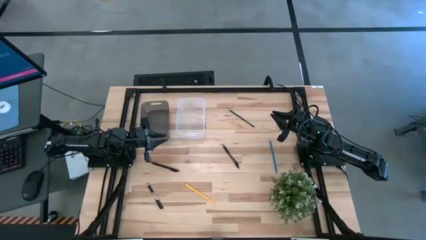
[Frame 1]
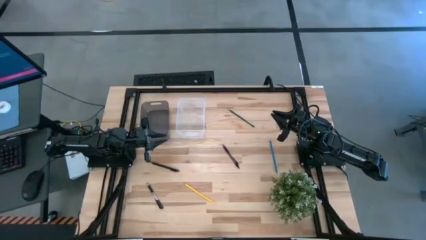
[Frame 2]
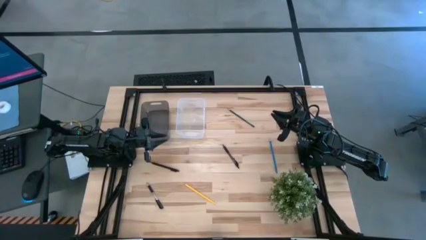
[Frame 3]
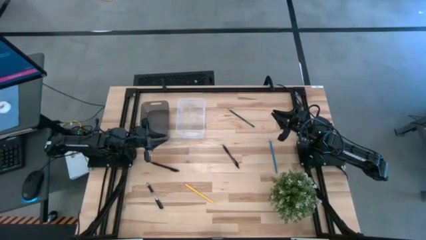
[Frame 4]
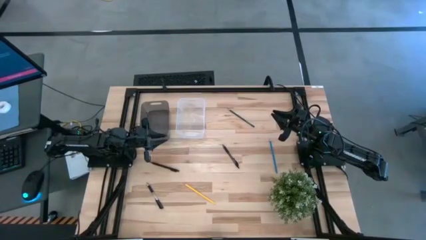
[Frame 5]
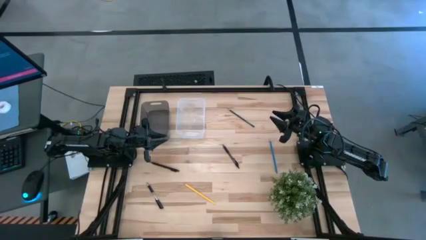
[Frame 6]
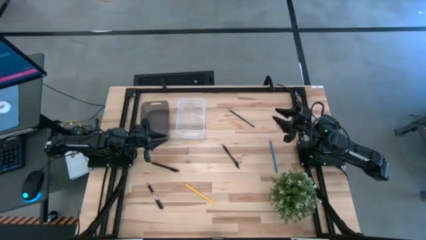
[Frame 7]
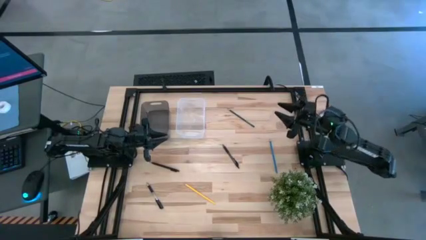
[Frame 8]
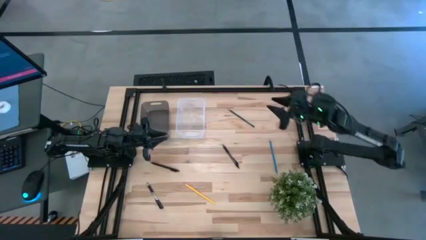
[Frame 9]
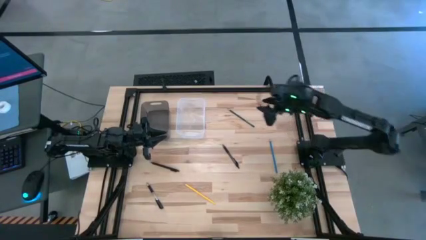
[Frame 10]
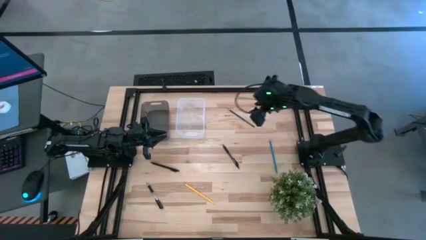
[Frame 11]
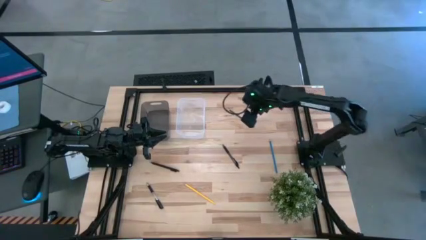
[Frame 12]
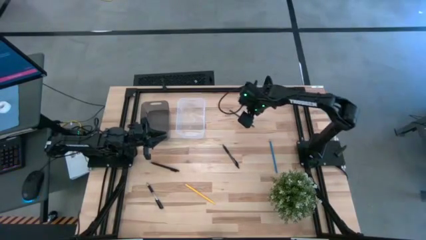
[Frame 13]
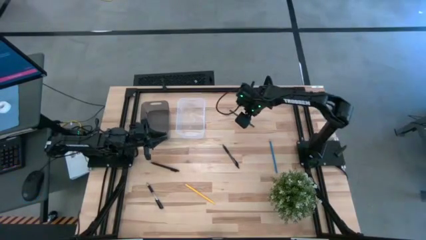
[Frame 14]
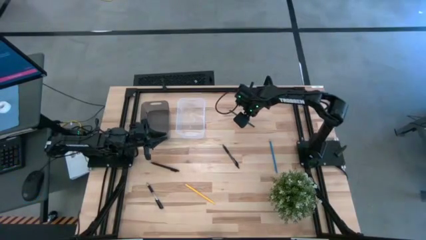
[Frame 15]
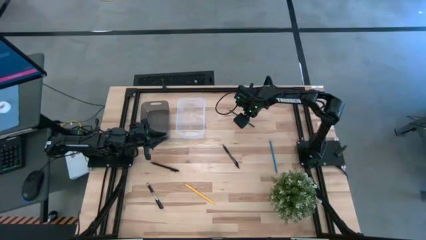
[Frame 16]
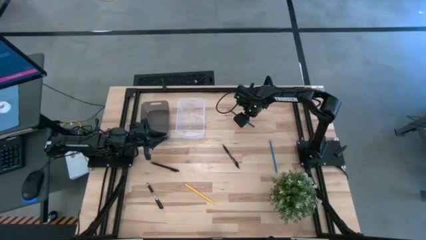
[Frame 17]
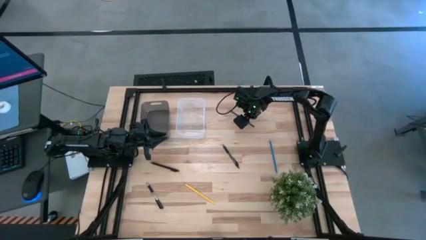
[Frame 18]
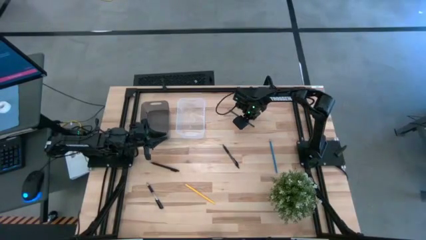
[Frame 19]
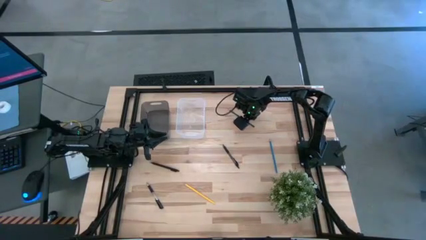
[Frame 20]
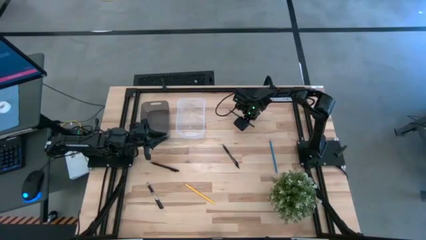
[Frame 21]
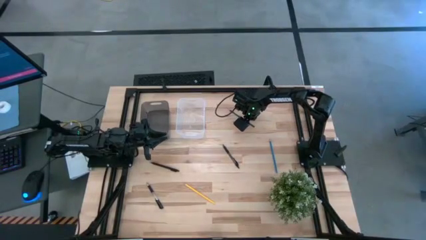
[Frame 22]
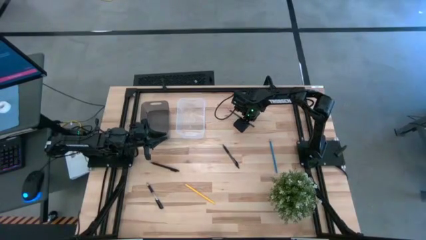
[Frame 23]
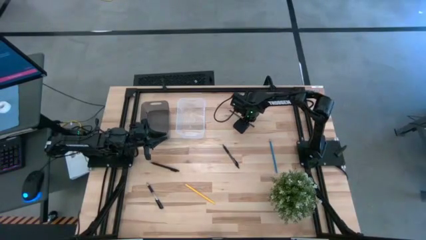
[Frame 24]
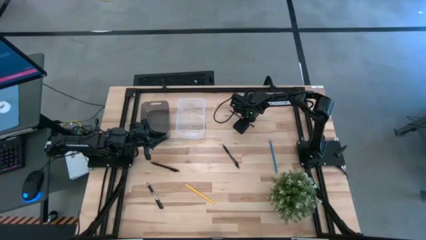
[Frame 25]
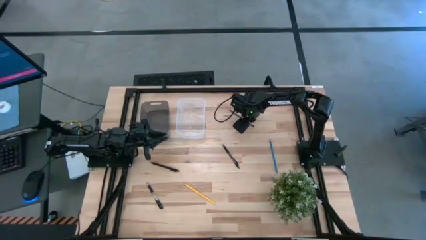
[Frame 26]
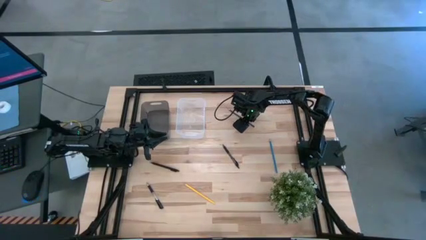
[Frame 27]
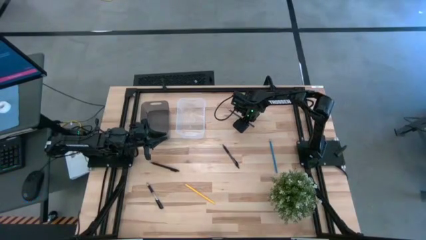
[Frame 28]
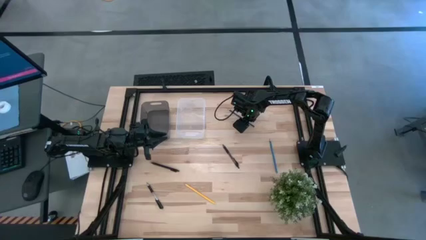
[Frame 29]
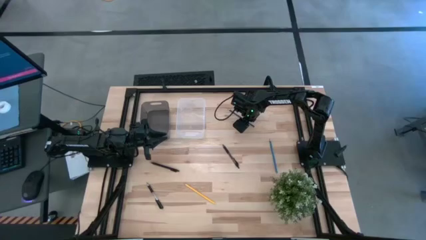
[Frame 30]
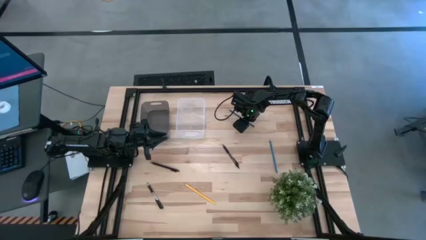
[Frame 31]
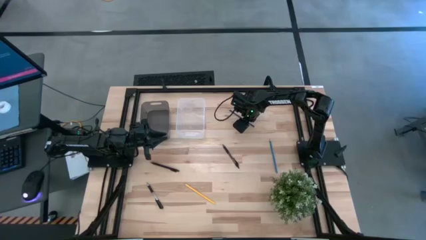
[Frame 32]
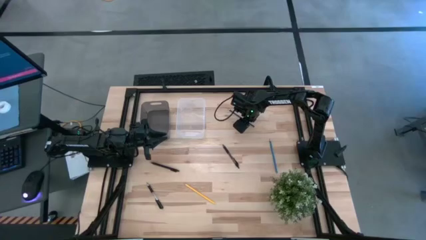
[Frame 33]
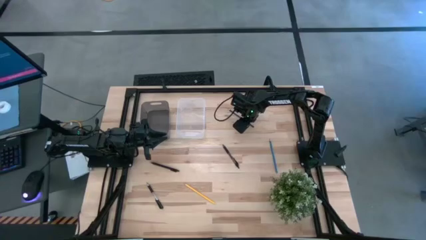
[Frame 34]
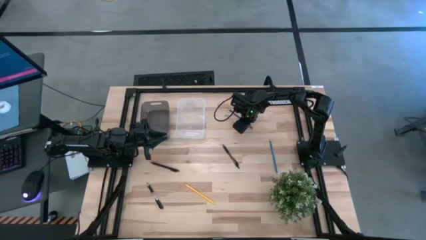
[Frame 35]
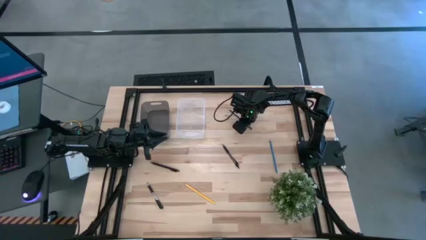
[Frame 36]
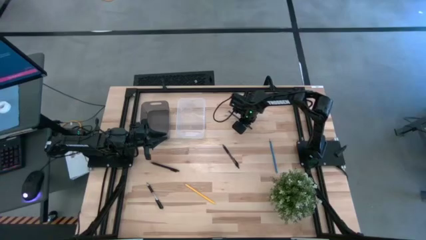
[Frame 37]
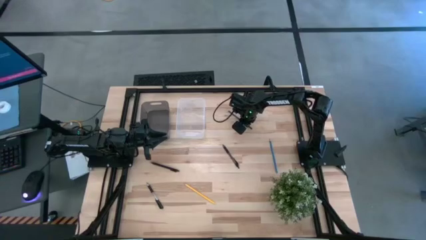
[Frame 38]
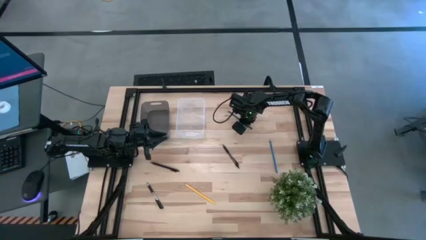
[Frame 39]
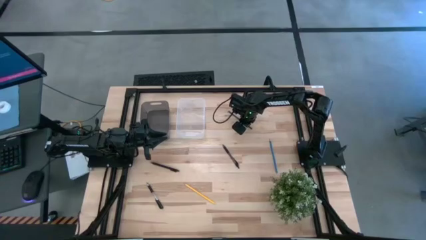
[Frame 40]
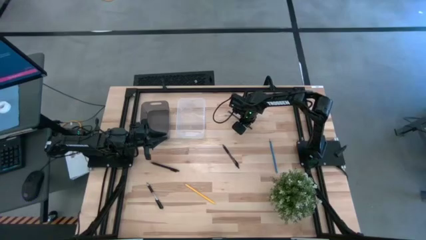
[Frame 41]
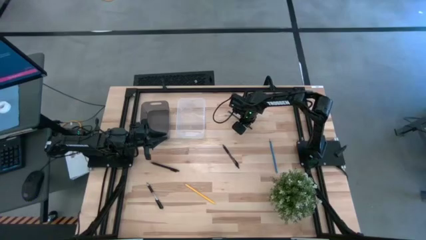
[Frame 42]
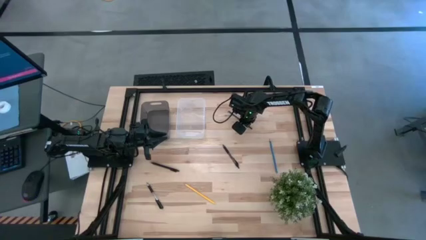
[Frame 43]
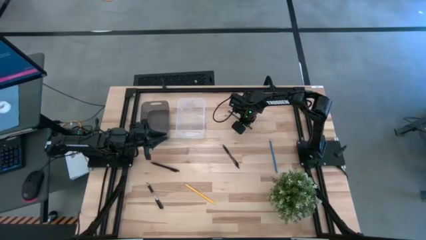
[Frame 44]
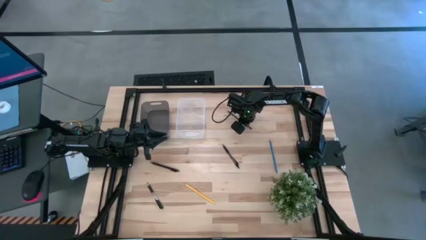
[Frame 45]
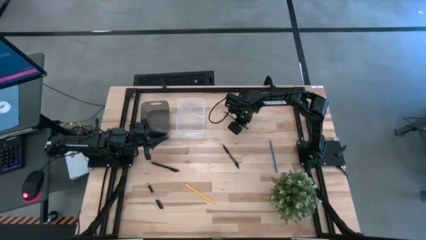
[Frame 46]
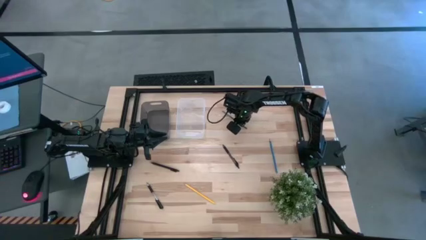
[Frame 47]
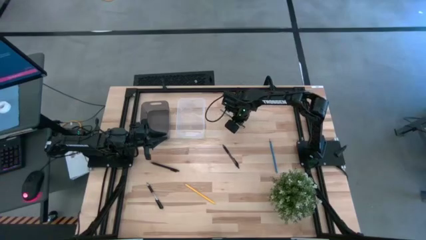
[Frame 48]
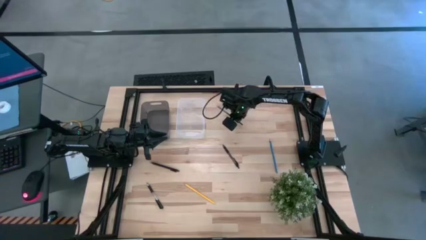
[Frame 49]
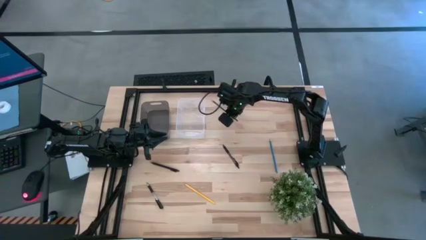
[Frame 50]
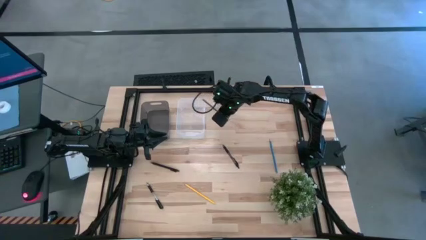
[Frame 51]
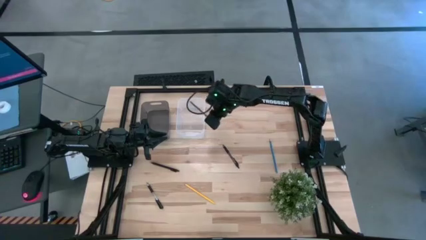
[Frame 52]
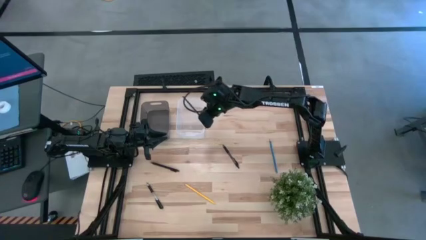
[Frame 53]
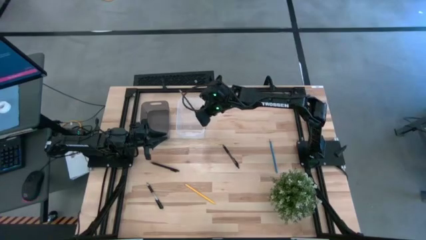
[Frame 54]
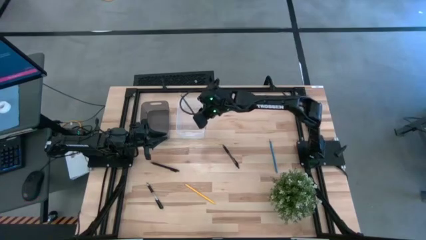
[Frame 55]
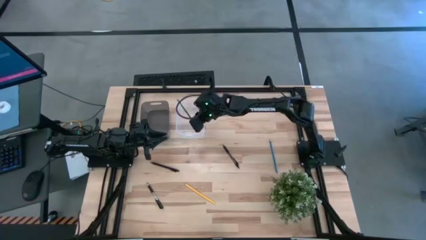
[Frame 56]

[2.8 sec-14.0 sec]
Task: Sort pens & pencils
Put the green pencil into the transparent bin
